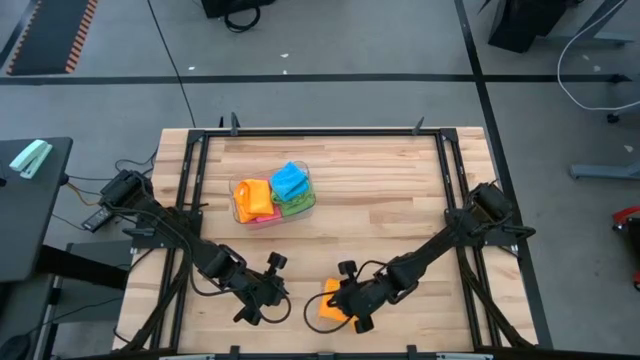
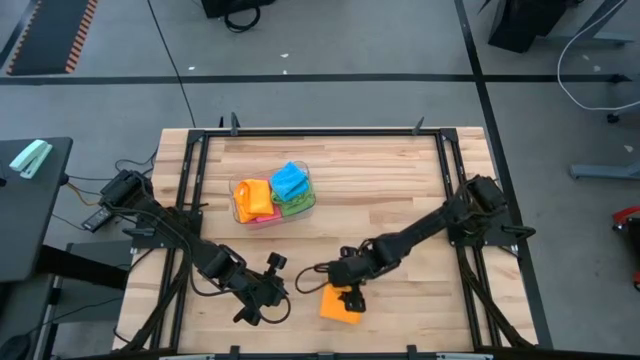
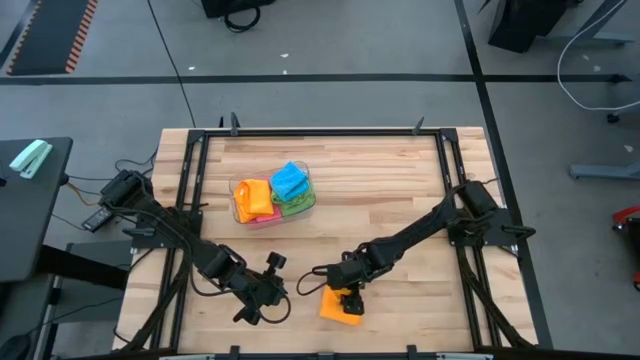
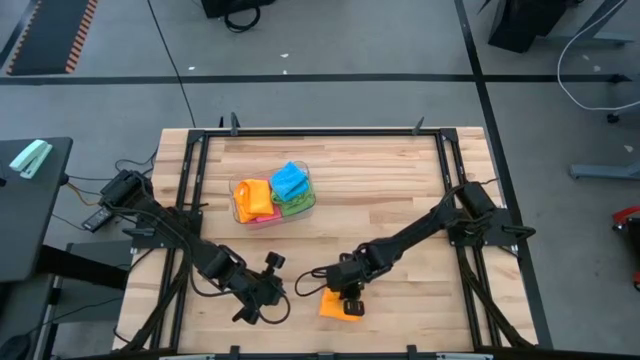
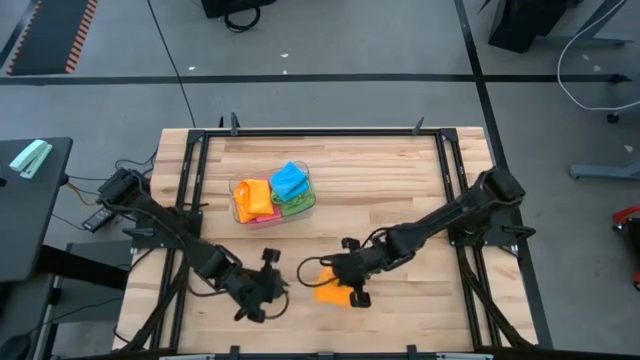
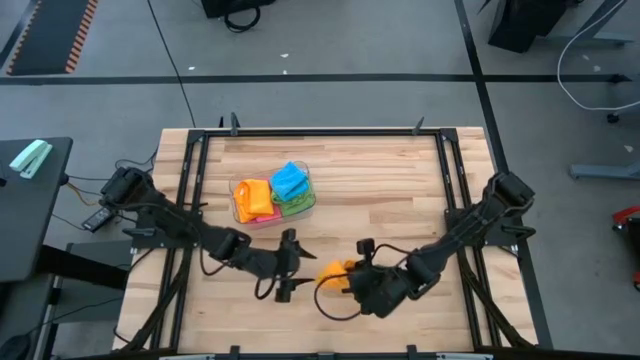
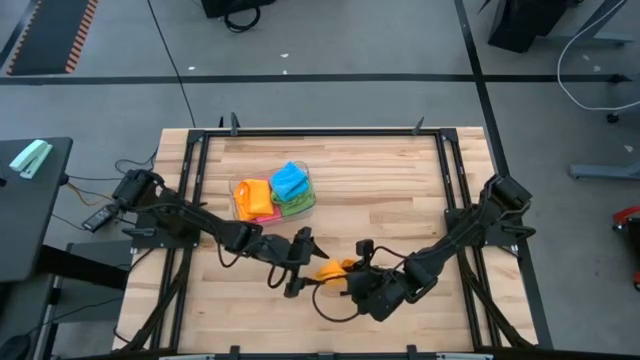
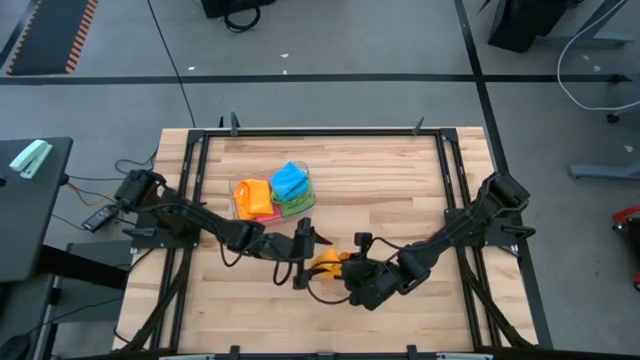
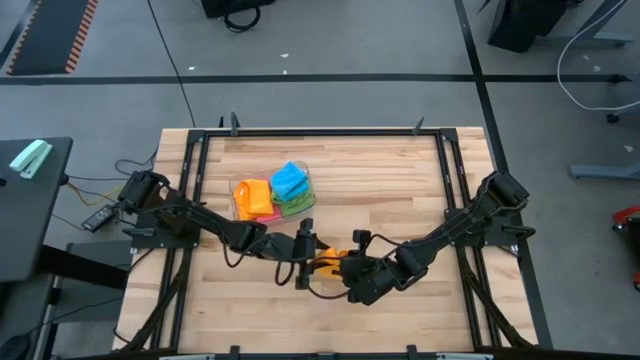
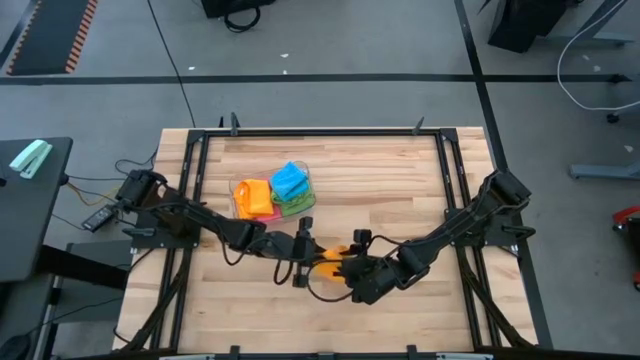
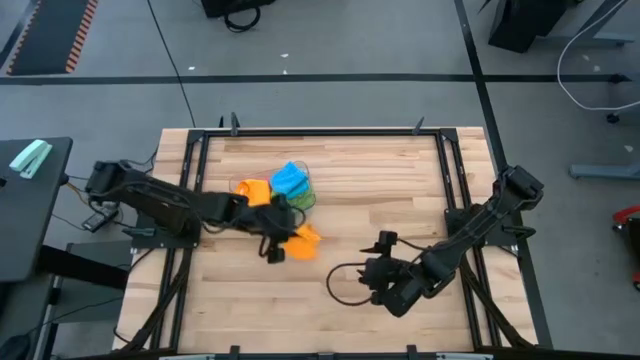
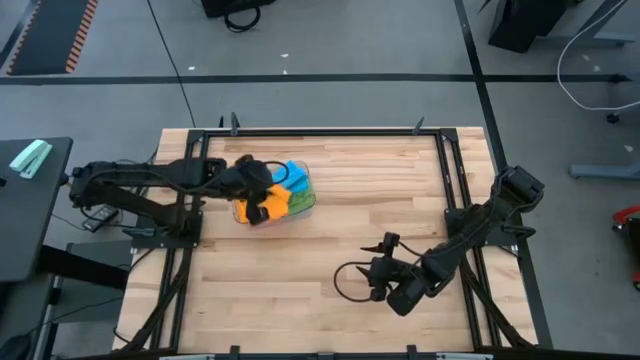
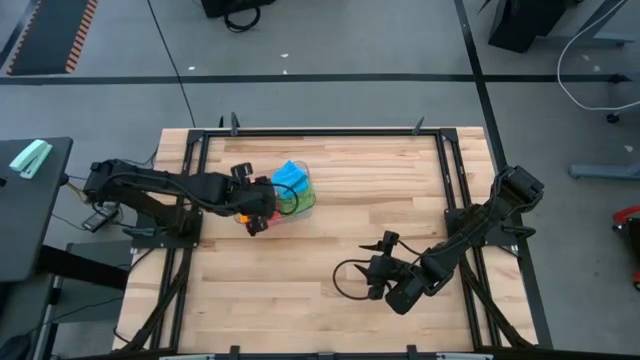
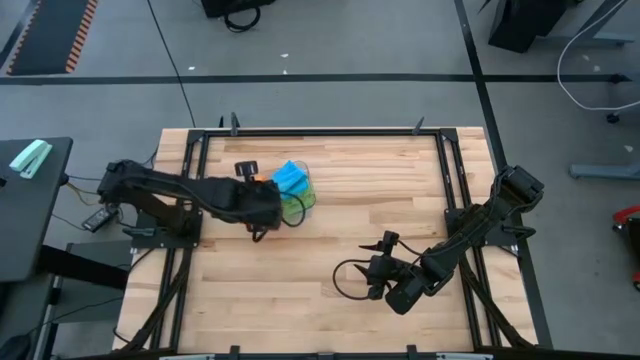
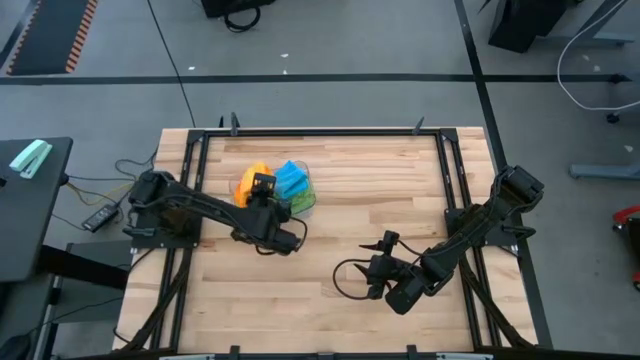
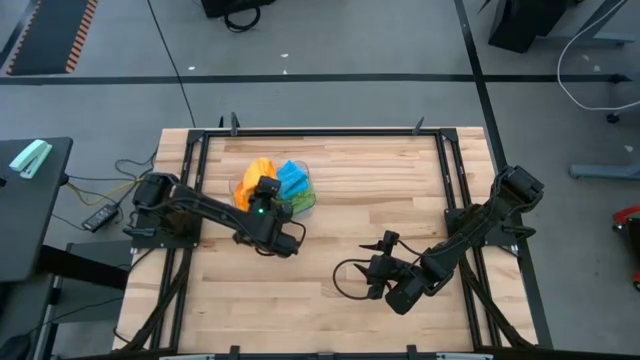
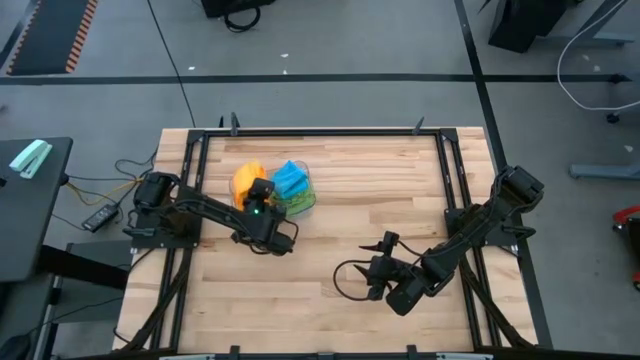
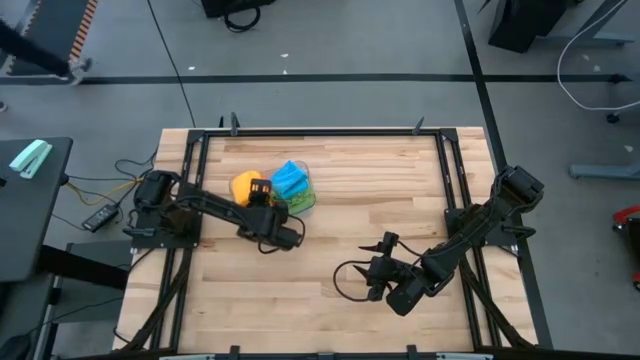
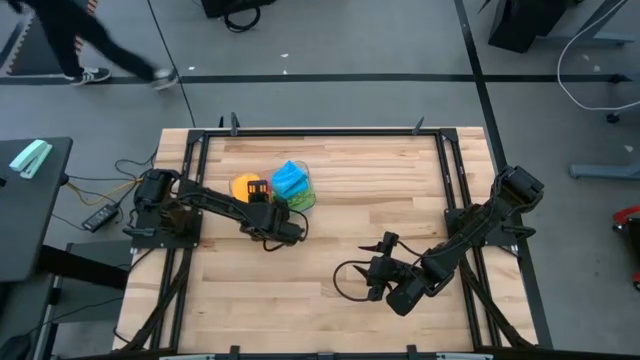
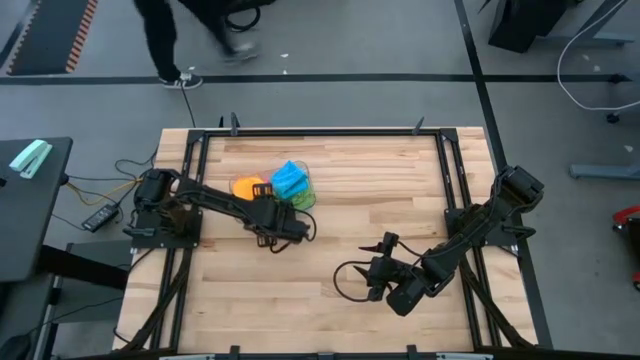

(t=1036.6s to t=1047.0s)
Task: Fold microfiber towels
Put the yellow microfiber towel into the transparent bin

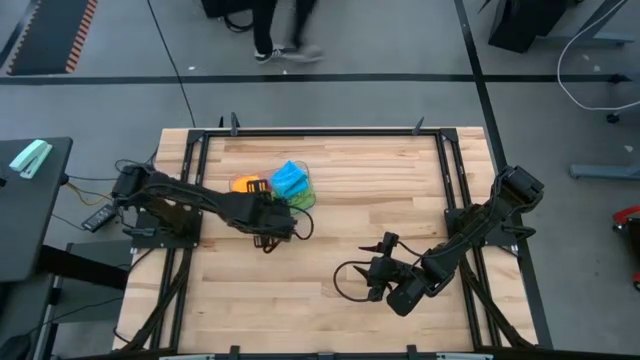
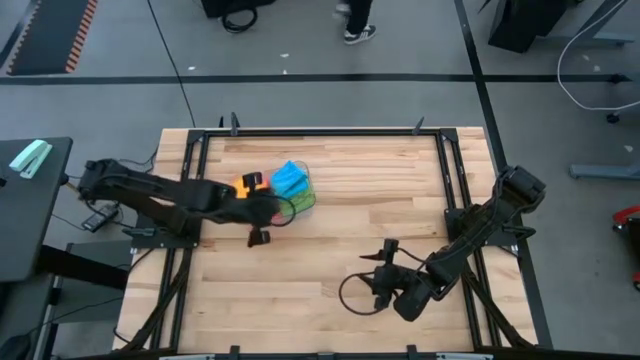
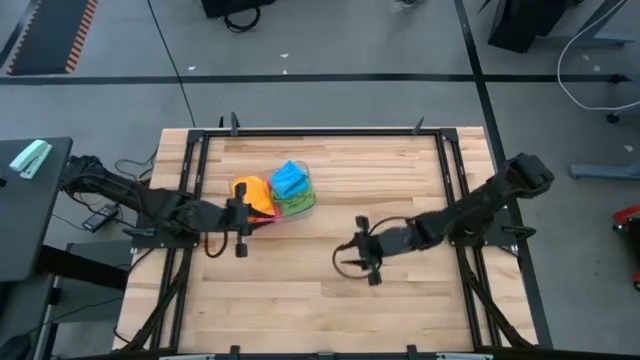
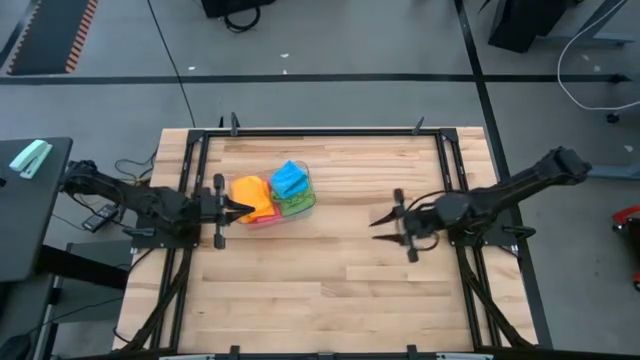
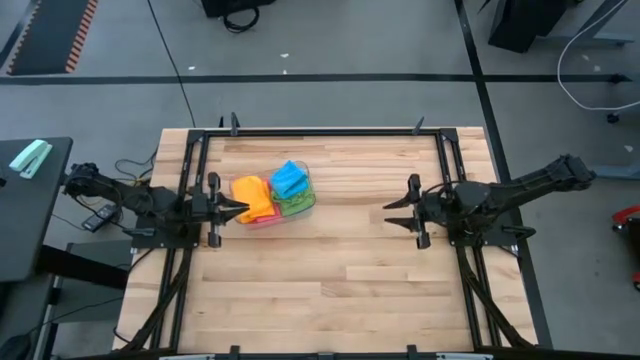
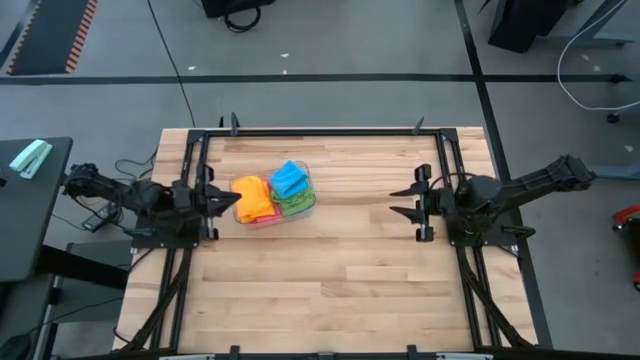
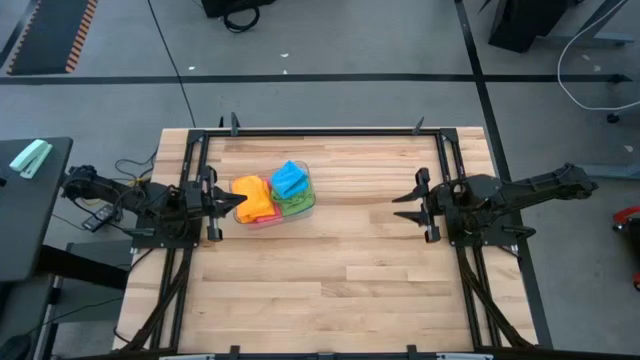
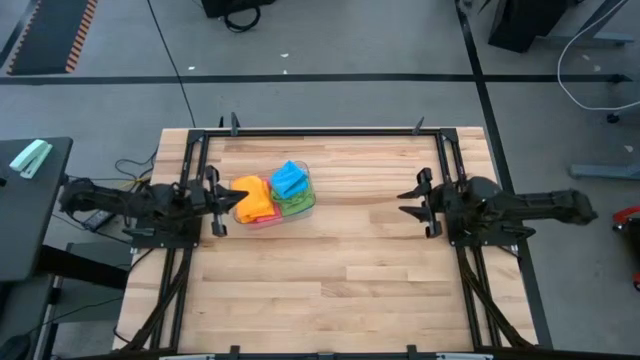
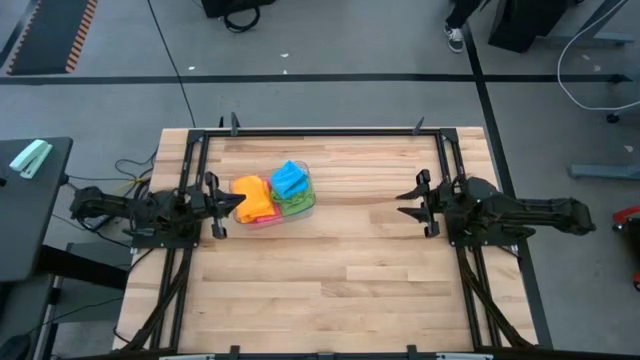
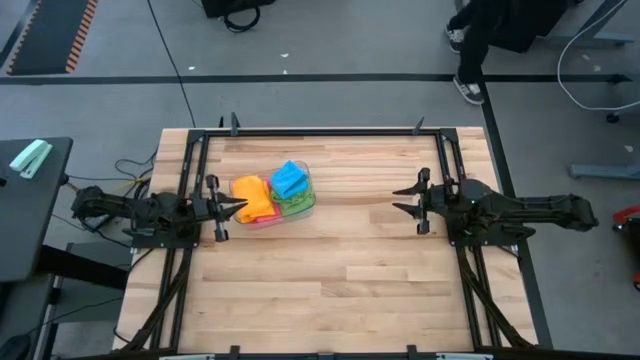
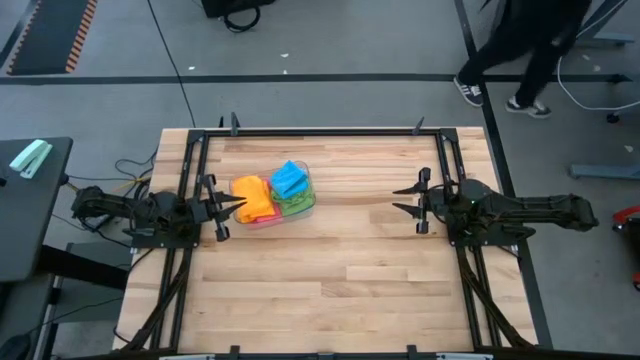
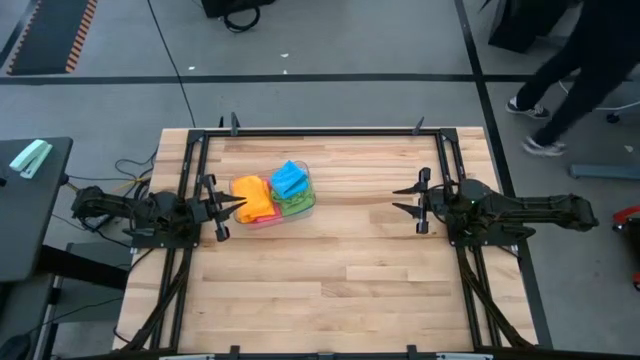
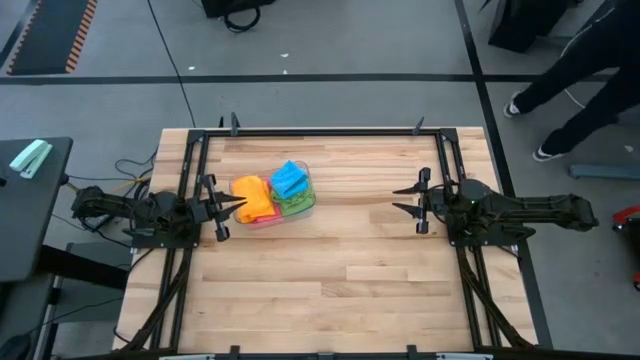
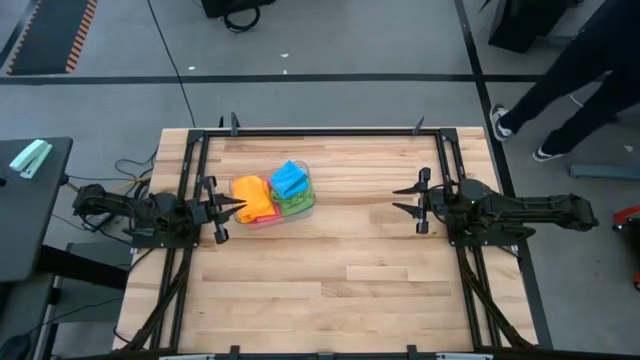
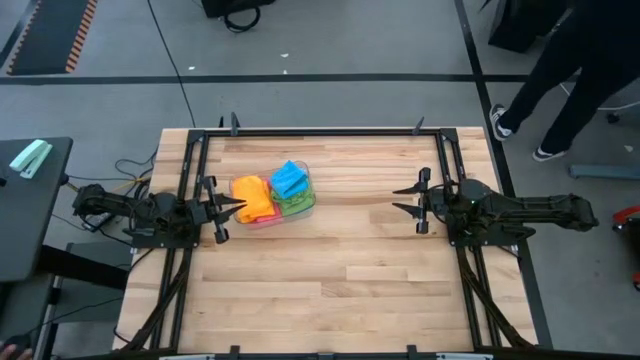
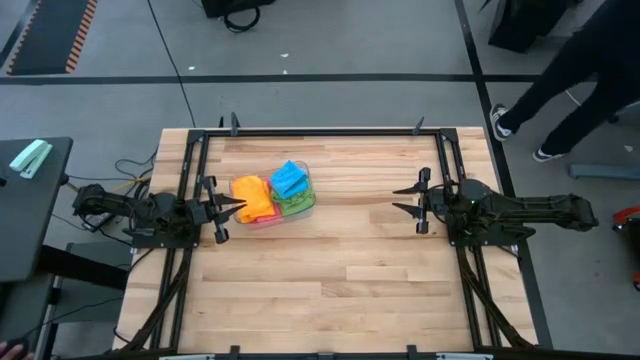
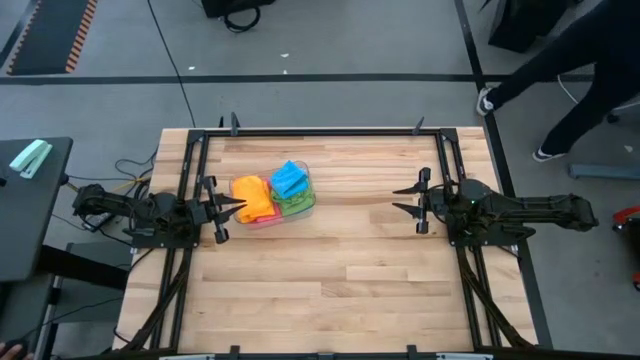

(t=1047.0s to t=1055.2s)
Return to Home Position

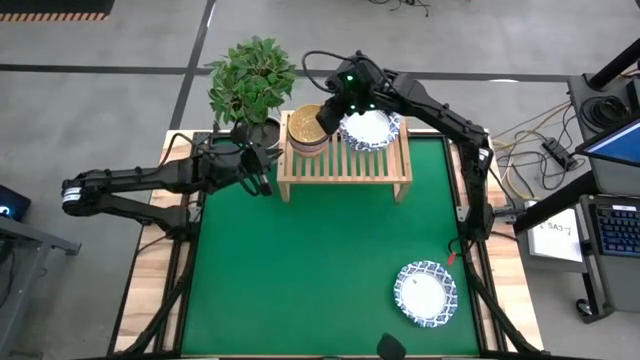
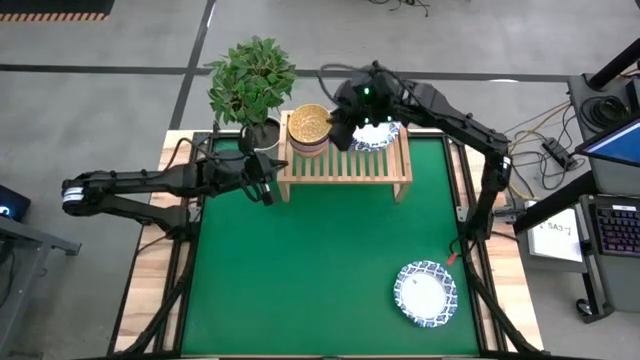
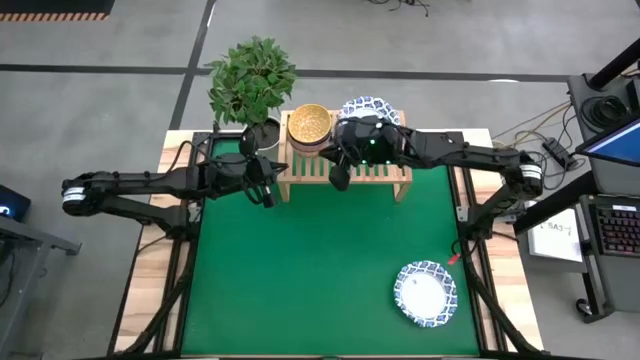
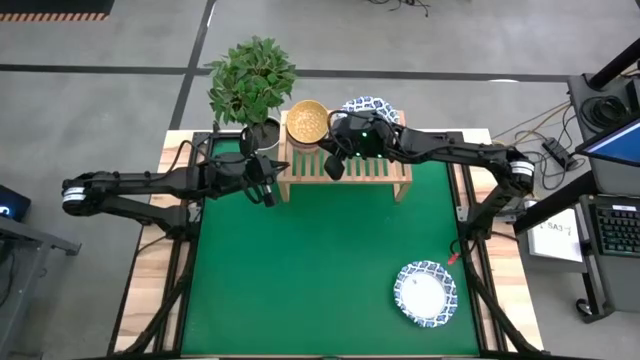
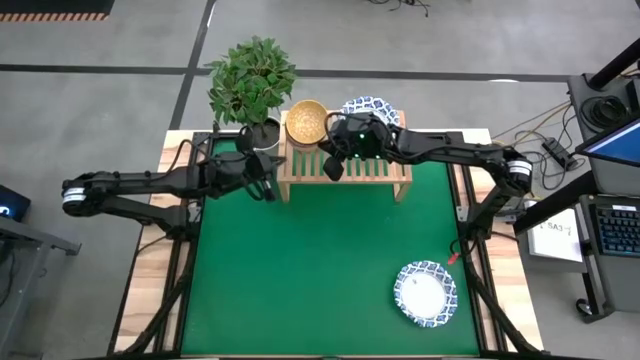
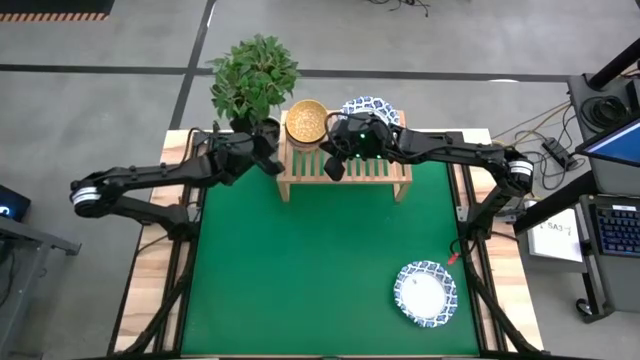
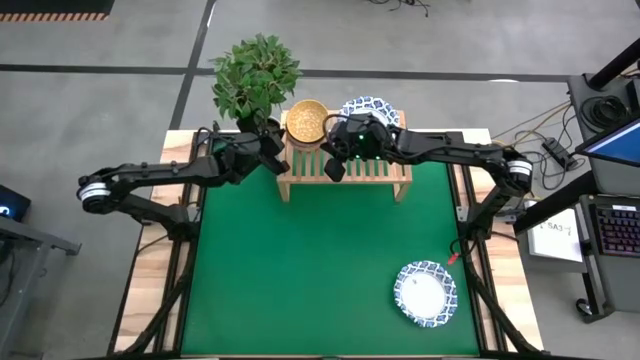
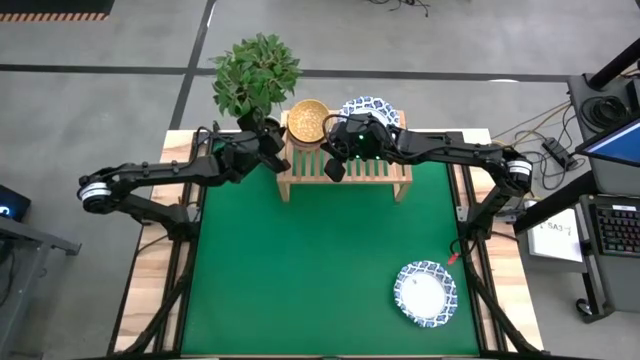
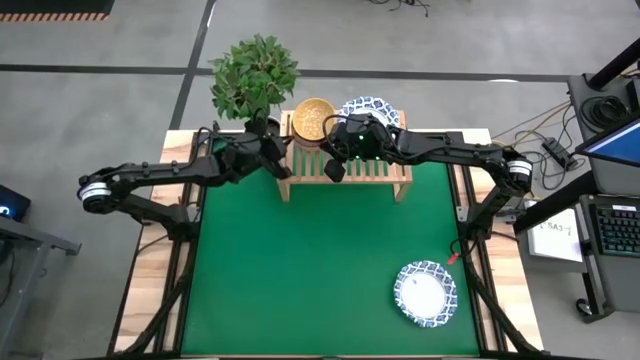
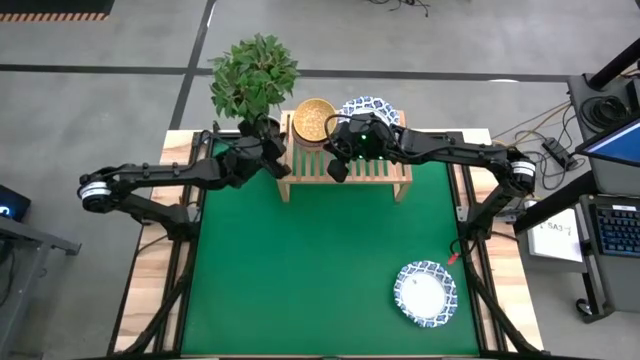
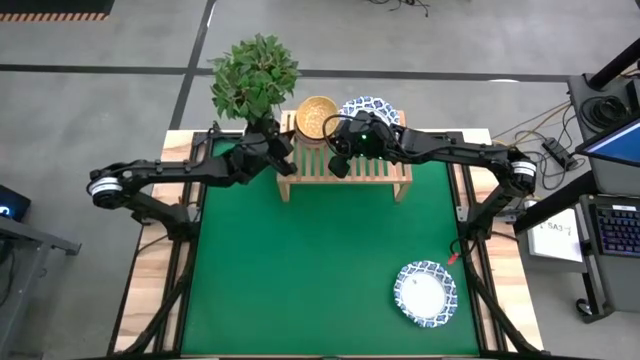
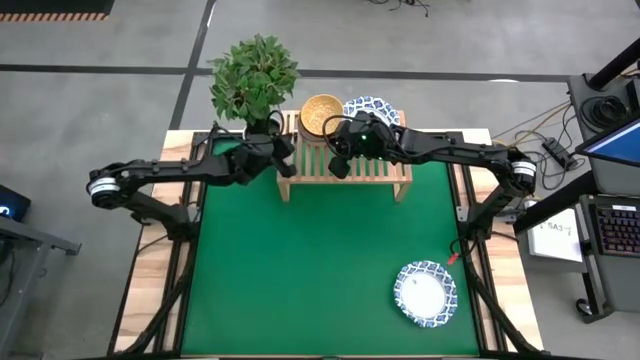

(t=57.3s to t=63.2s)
Task: Place and stack bowls onto a shelf
Adjust the left stacked bowls on the shelf
